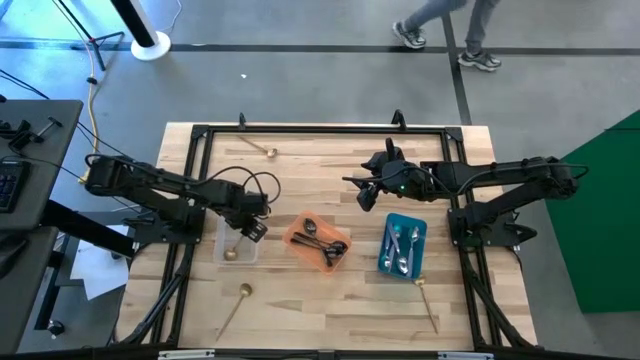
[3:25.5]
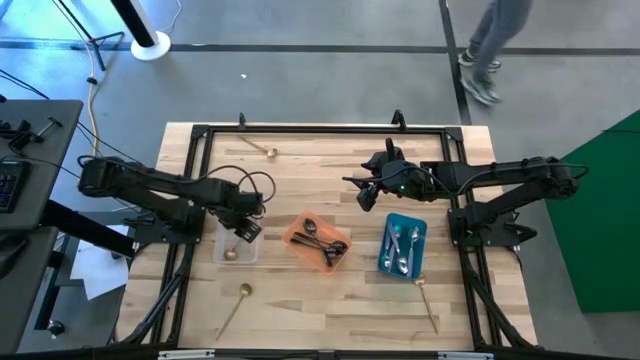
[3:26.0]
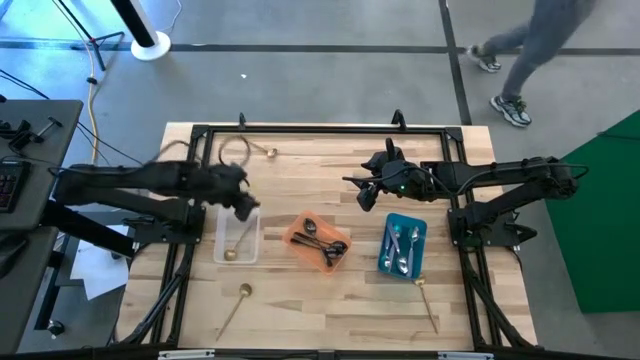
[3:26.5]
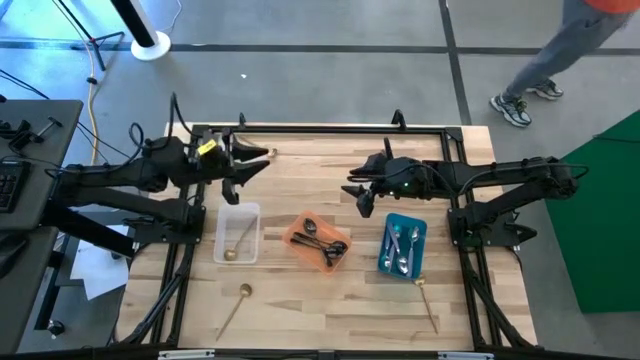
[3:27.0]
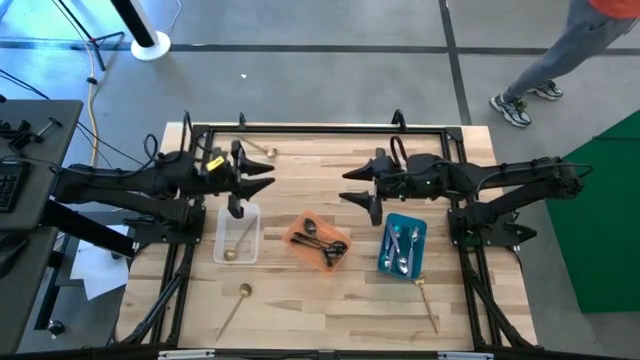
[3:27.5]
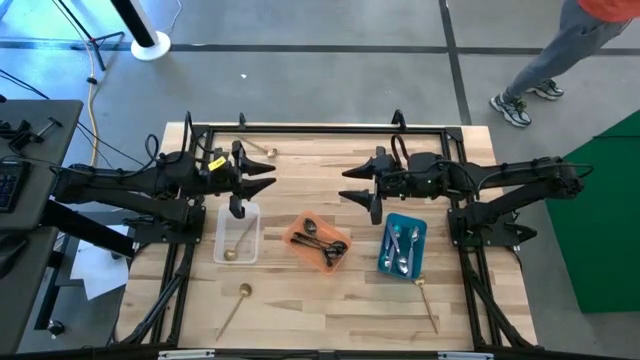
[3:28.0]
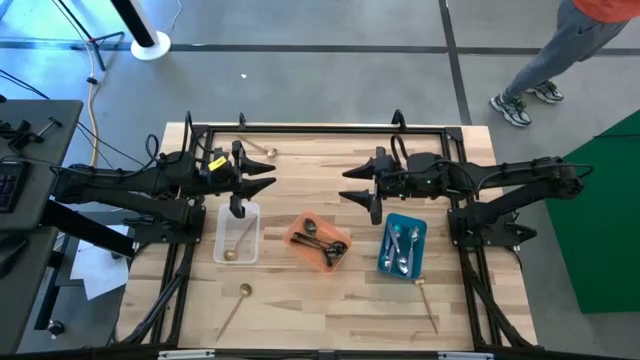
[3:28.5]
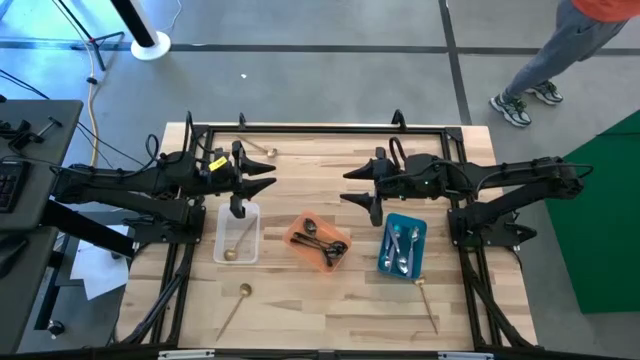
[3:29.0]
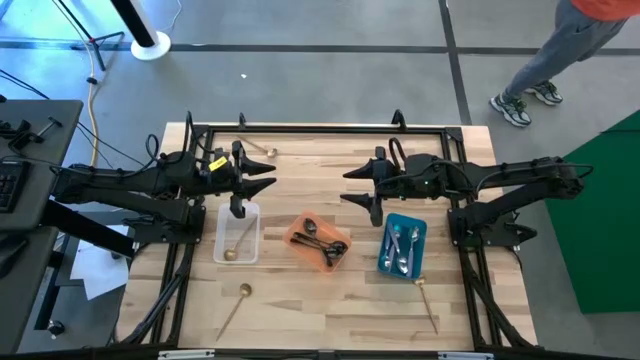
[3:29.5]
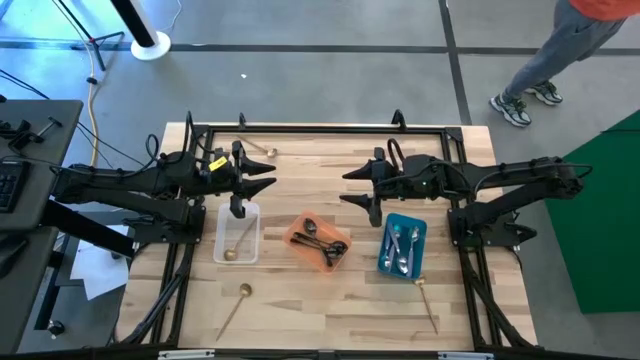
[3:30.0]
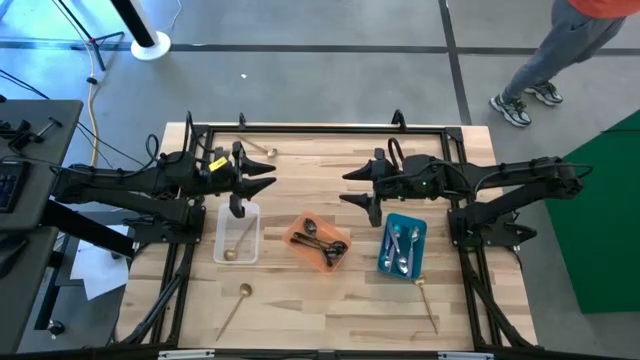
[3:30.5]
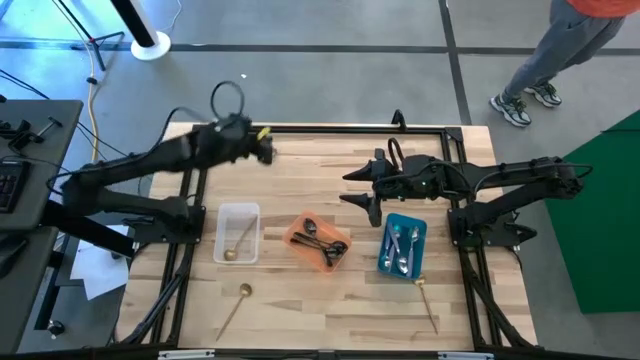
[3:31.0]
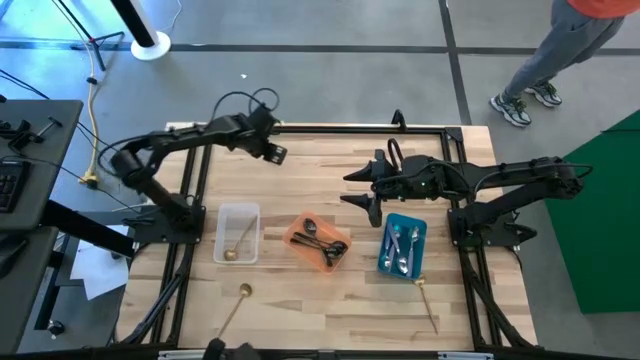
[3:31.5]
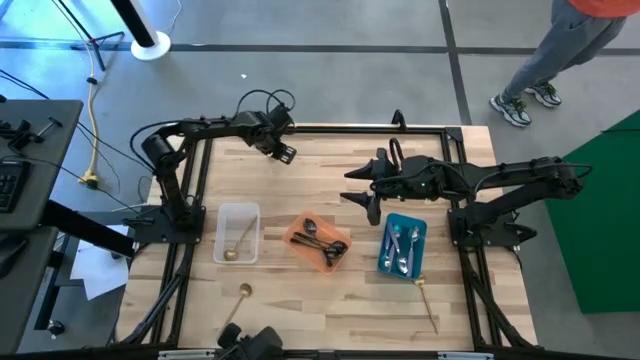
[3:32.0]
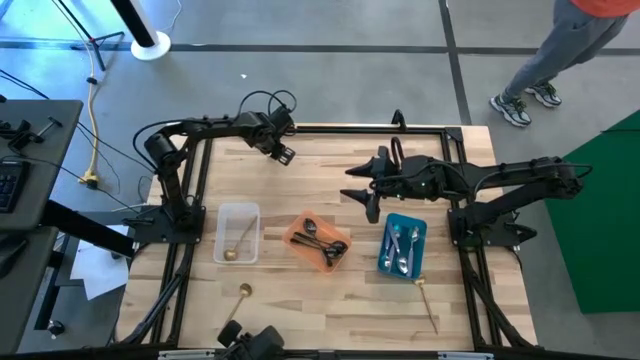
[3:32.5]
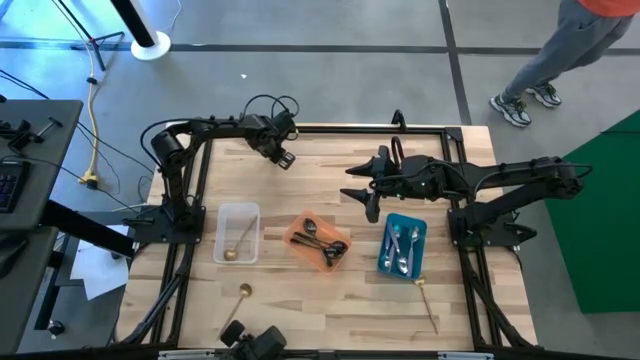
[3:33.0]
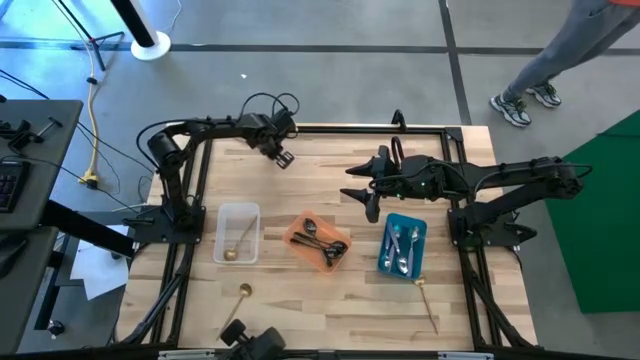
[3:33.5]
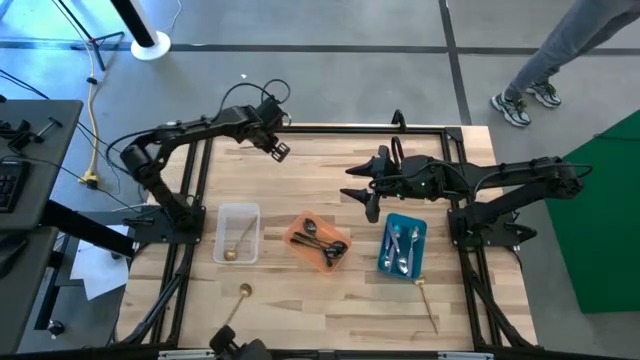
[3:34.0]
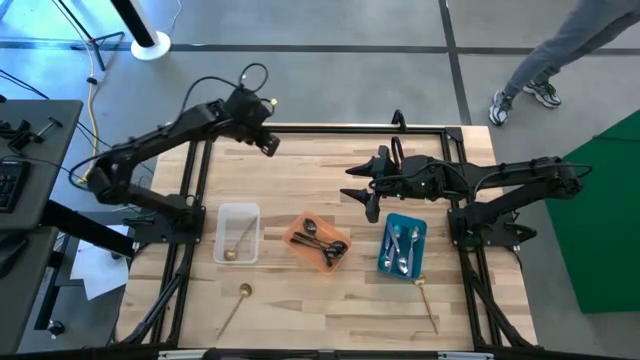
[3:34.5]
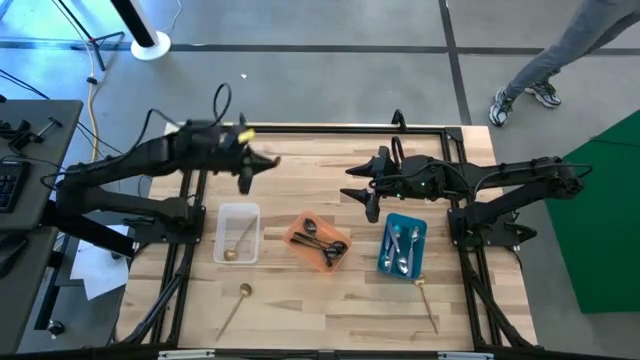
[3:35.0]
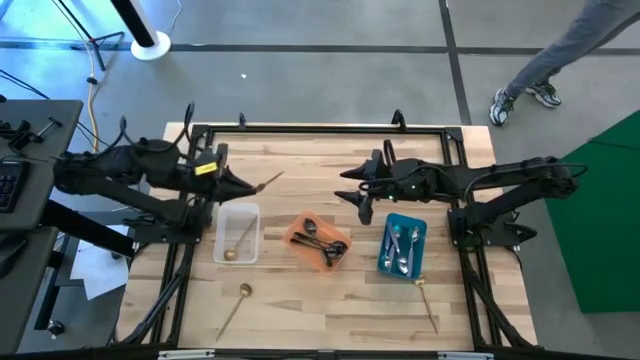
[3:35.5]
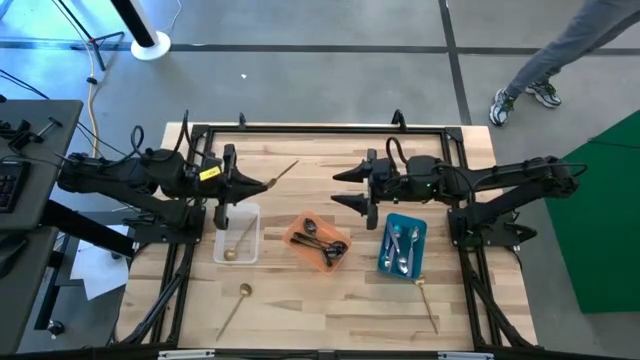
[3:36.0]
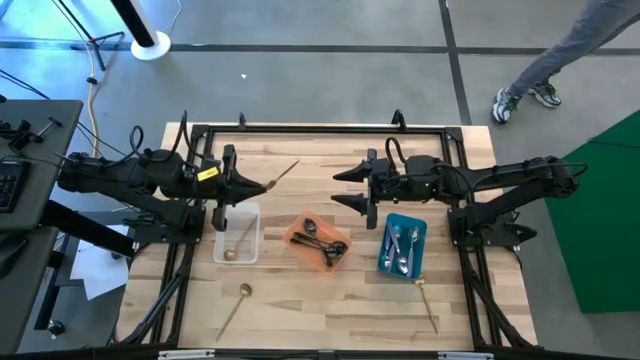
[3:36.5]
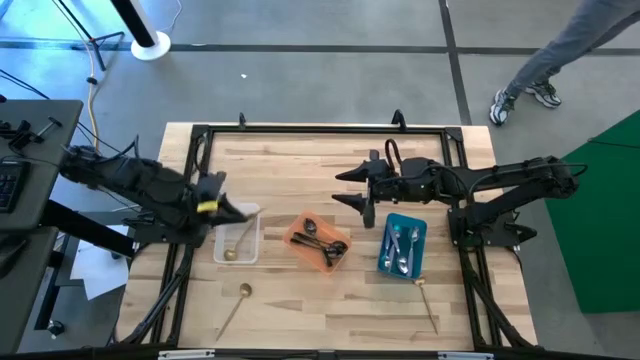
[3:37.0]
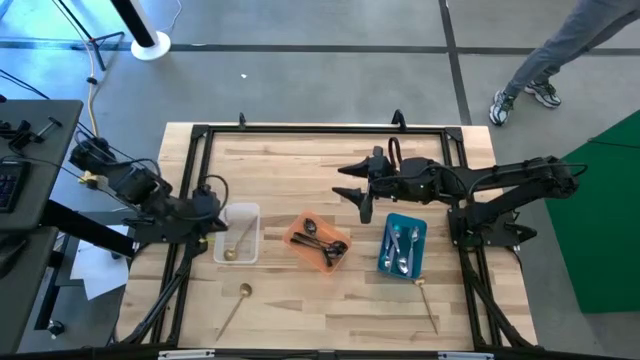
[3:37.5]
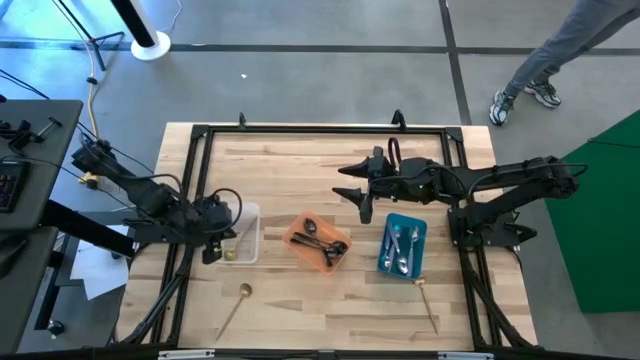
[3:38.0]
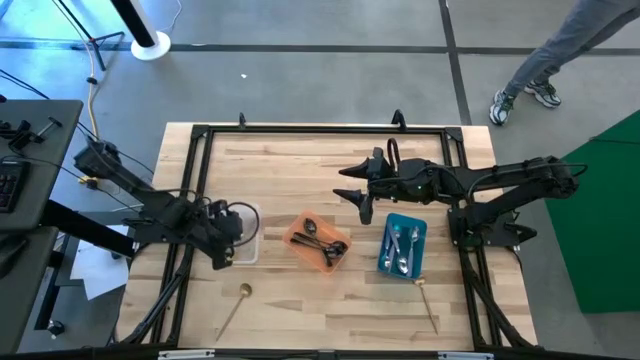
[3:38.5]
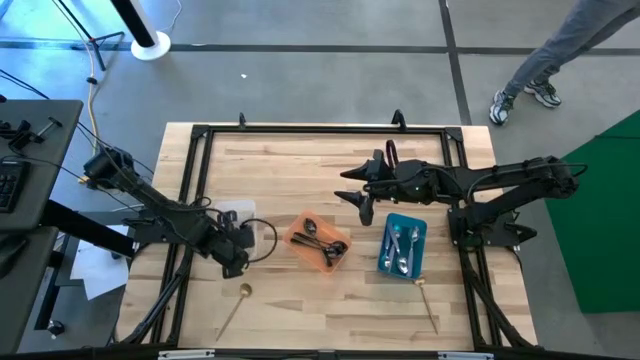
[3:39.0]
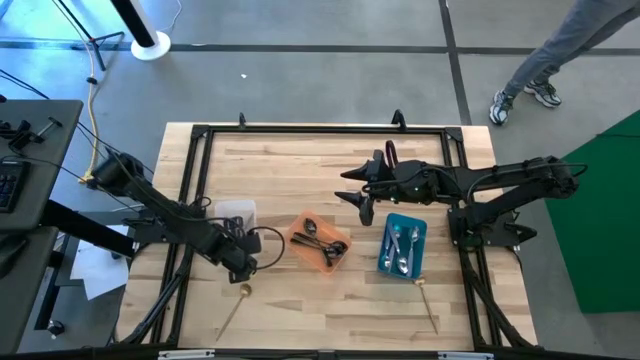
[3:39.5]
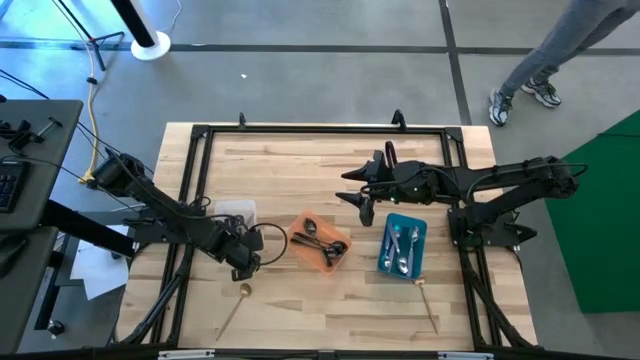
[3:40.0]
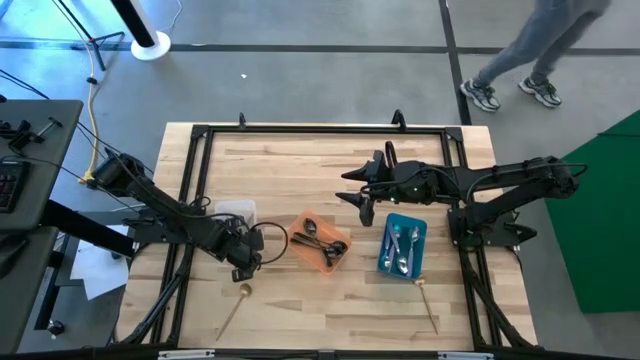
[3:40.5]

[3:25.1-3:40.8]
Task: Sort silverware by color (type)
Put the top gold spoon into the transparent bin
